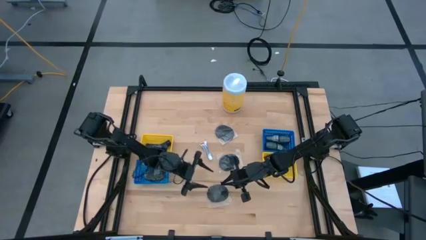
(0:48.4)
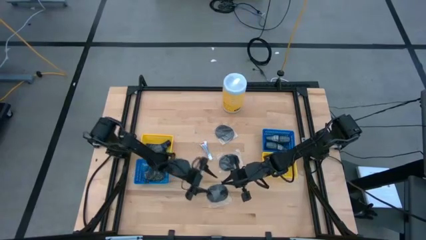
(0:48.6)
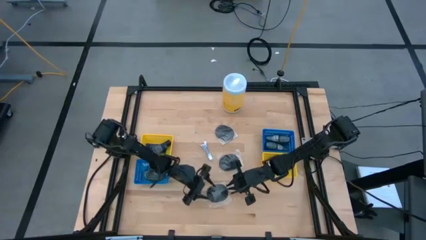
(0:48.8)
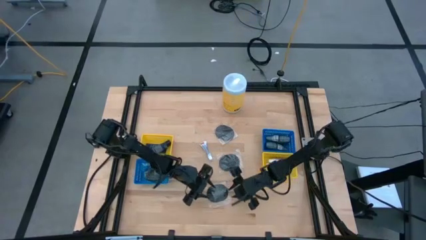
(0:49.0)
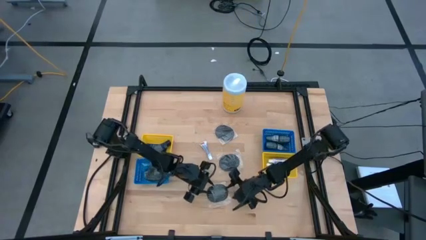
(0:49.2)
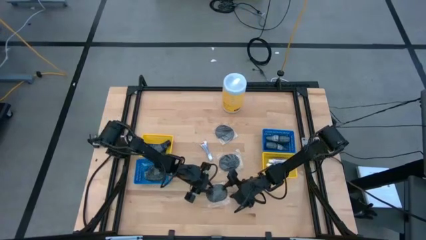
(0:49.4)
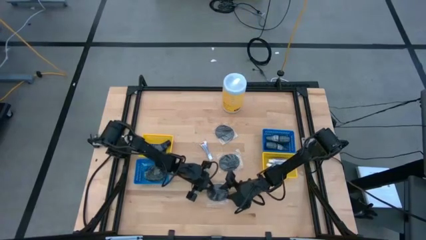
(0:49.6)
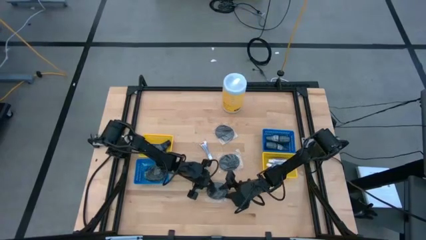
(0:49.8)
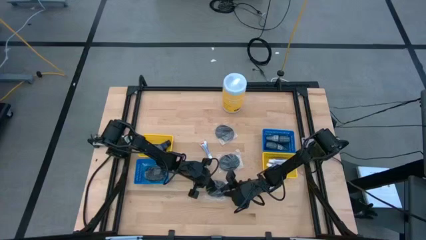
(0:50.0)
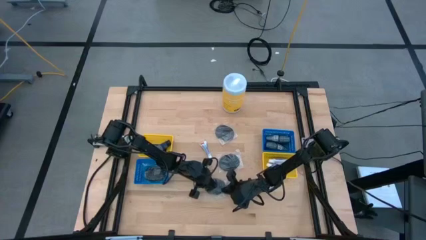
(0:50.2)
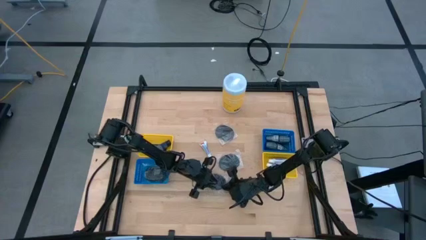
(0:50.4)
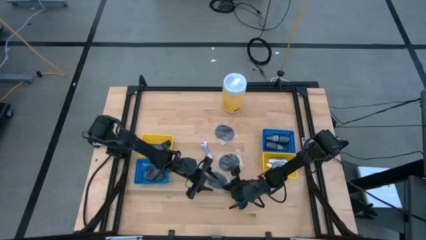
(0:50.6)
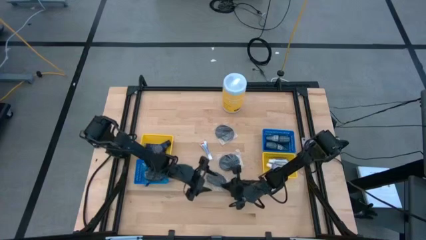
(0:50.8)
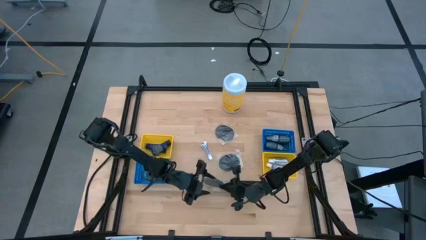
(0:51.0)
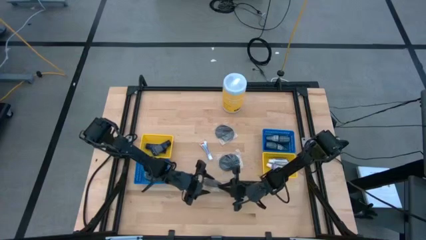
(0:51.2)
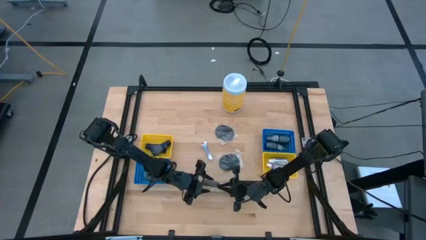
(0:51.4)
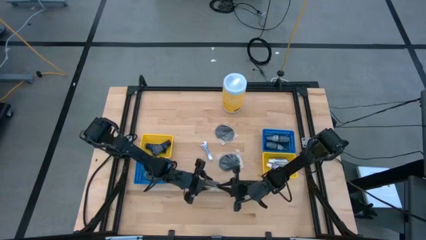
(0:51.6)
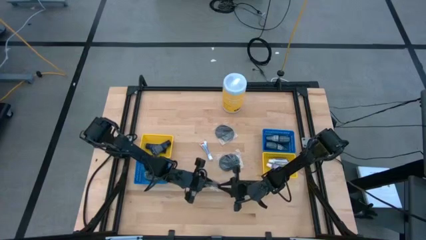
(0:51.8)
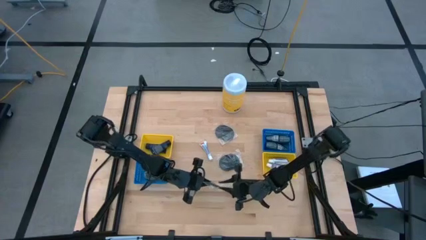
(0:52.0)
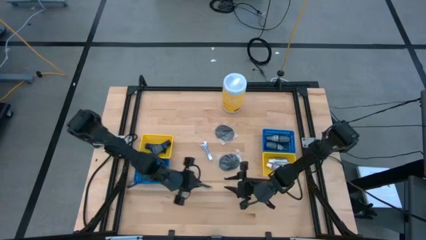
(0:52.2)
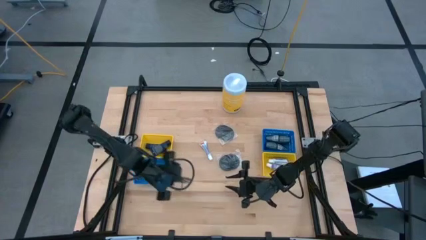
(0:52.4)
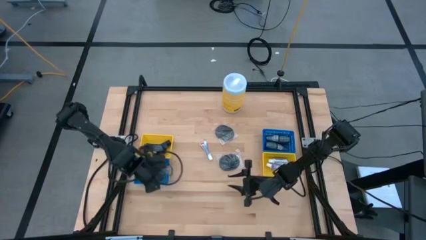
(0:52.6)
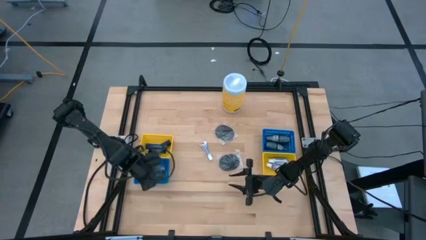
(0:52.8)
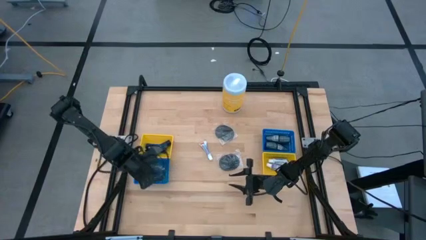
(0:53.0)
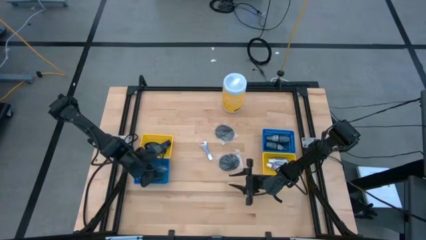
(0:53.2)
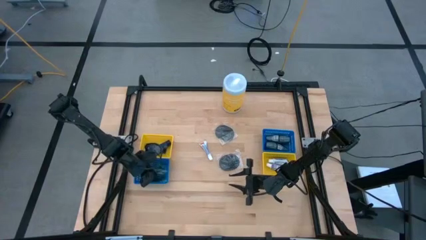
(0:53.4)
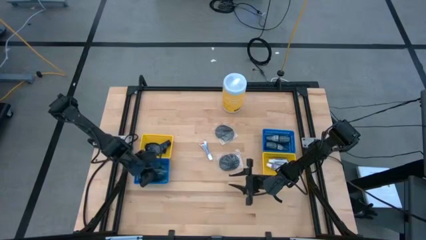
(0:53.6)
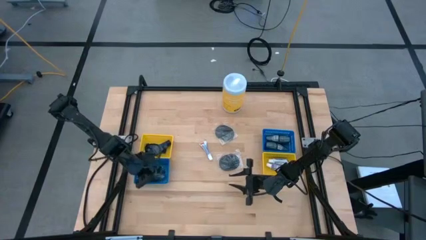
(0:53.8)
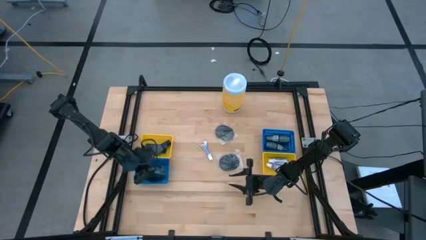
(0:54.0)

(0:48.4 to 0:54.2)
Task: Pick & Place Travel size toiletries
Put the black hairbrush into the left blue bin

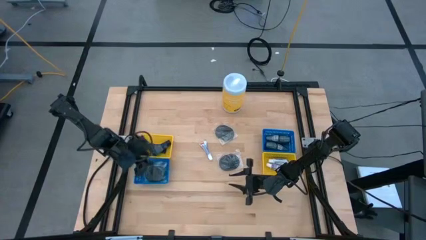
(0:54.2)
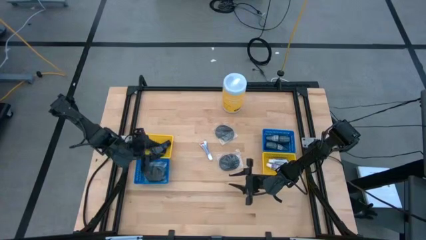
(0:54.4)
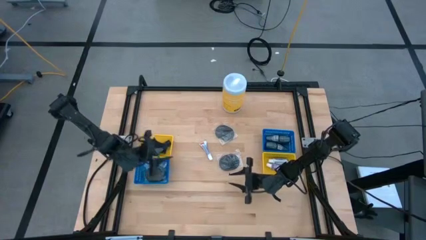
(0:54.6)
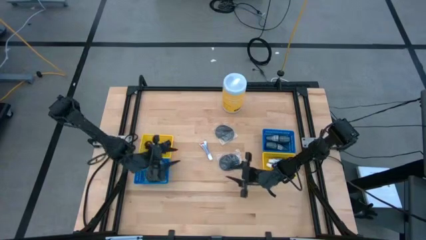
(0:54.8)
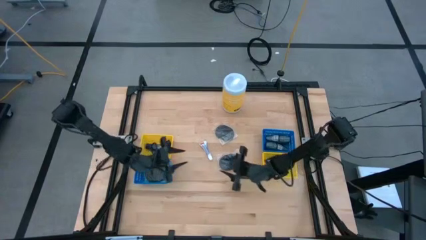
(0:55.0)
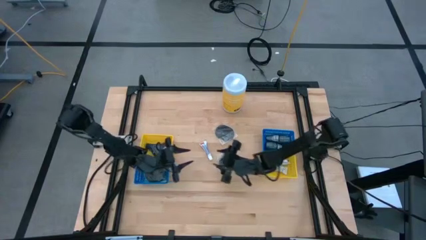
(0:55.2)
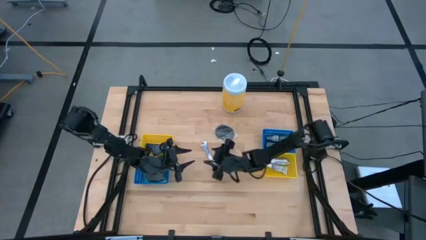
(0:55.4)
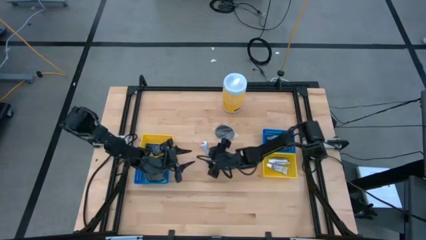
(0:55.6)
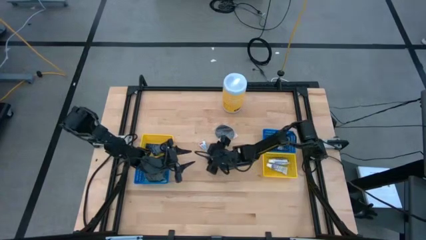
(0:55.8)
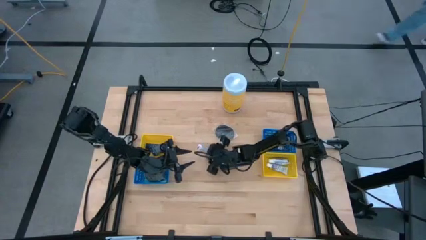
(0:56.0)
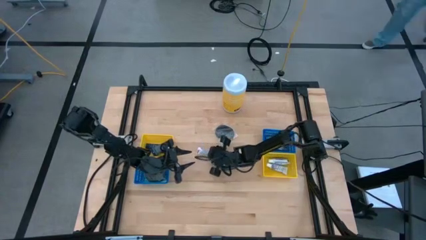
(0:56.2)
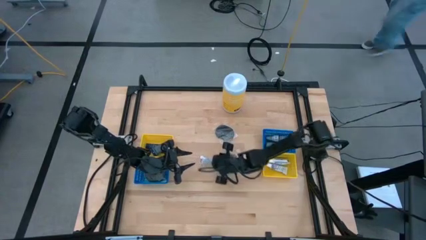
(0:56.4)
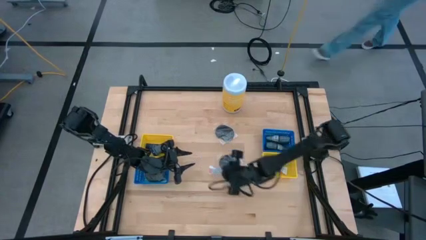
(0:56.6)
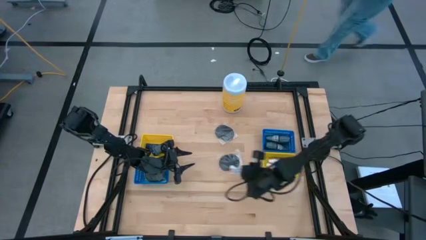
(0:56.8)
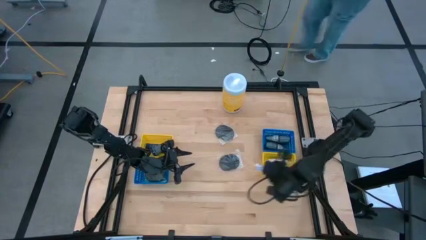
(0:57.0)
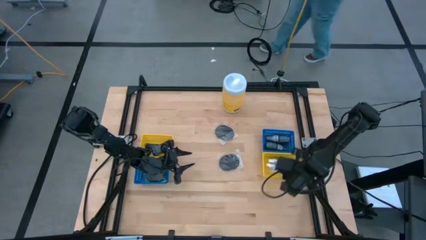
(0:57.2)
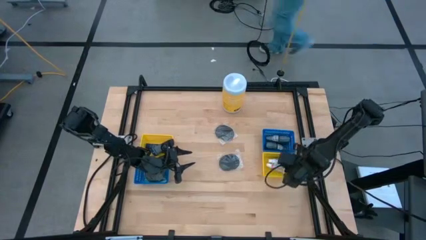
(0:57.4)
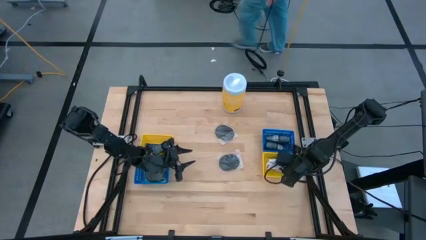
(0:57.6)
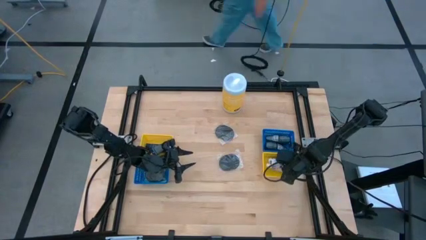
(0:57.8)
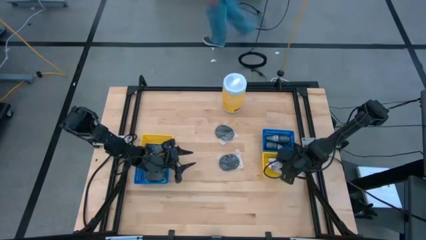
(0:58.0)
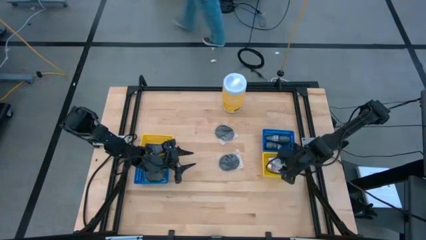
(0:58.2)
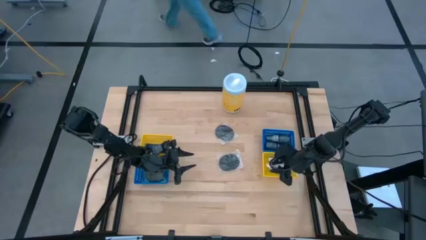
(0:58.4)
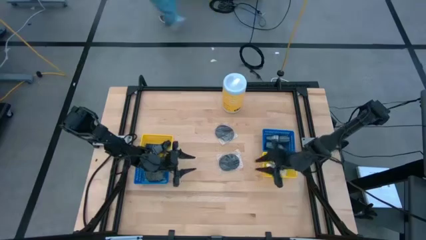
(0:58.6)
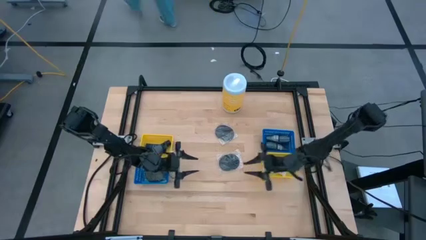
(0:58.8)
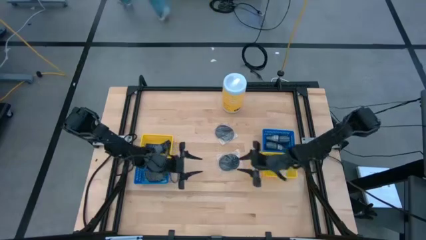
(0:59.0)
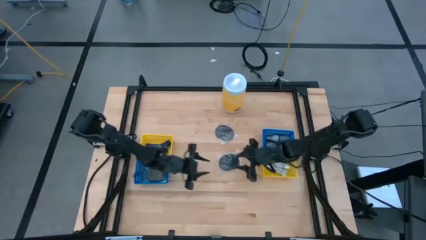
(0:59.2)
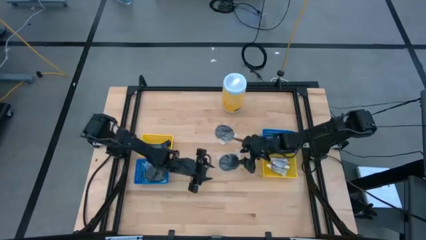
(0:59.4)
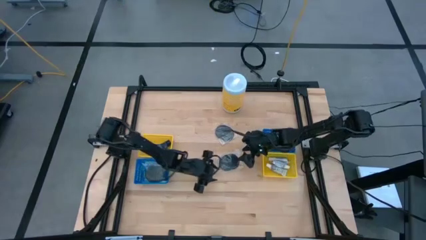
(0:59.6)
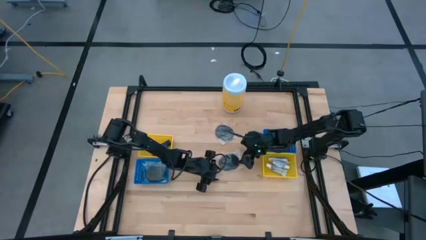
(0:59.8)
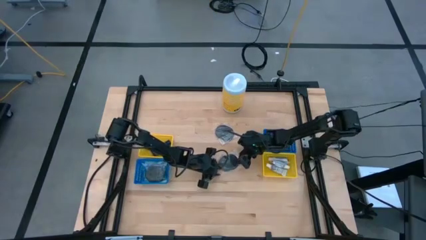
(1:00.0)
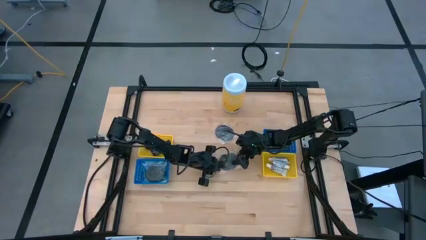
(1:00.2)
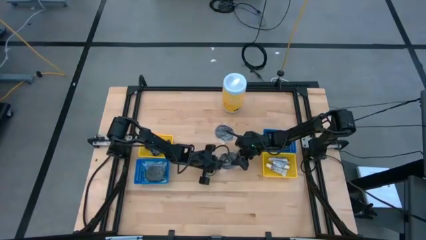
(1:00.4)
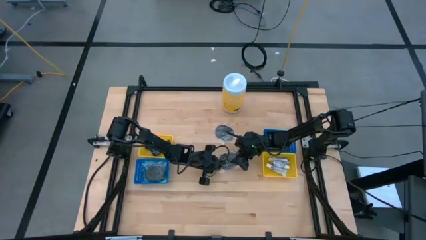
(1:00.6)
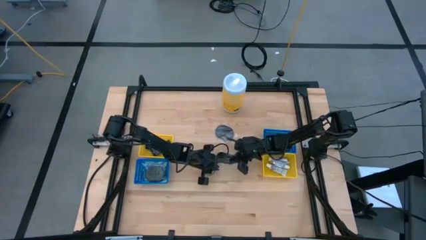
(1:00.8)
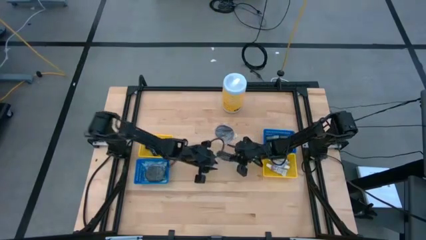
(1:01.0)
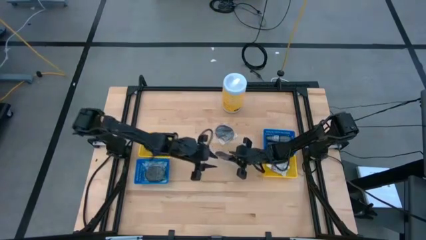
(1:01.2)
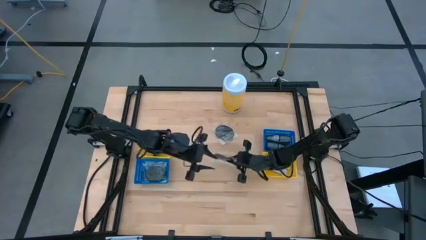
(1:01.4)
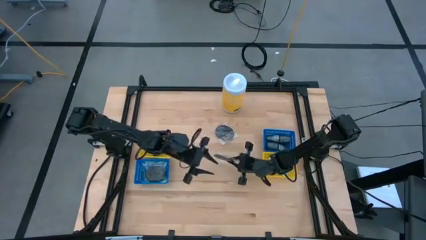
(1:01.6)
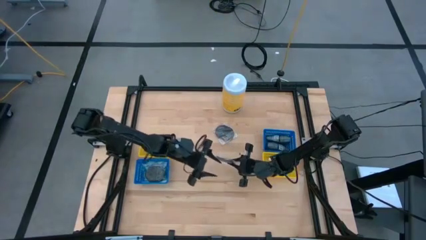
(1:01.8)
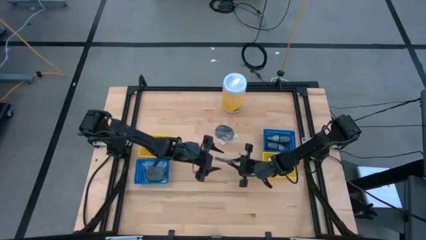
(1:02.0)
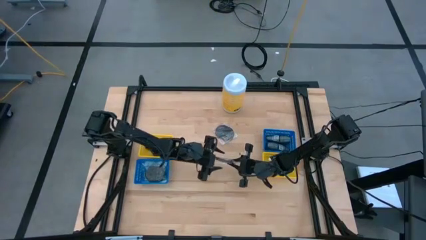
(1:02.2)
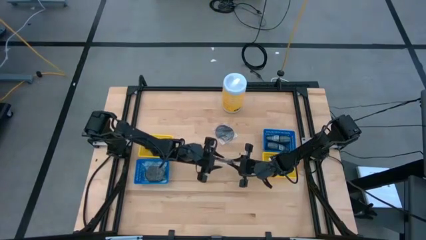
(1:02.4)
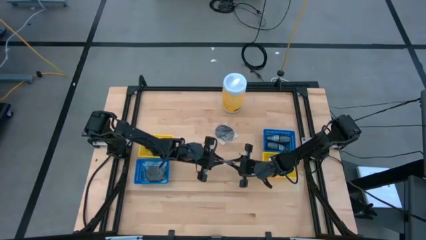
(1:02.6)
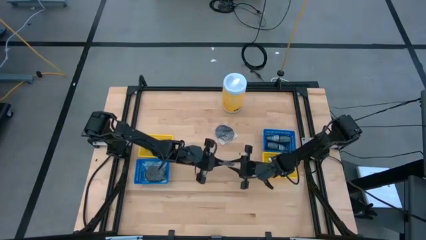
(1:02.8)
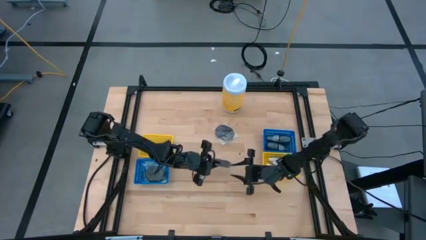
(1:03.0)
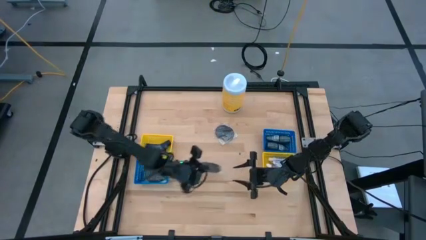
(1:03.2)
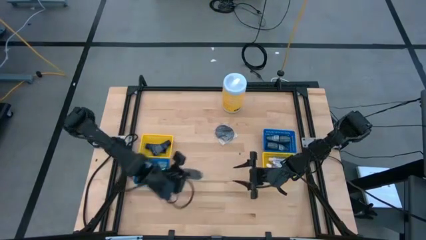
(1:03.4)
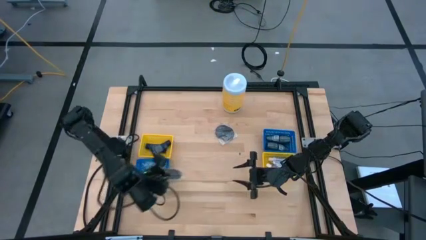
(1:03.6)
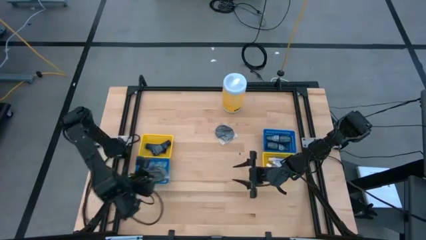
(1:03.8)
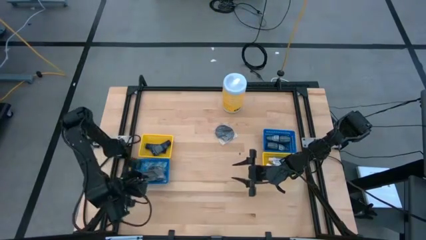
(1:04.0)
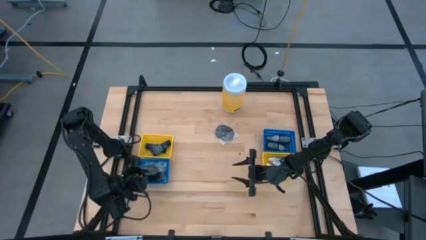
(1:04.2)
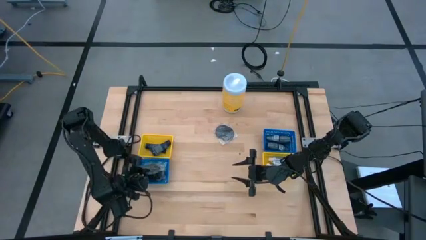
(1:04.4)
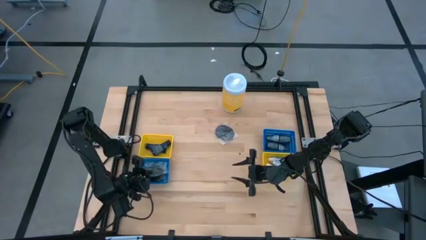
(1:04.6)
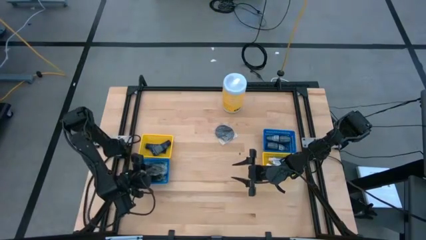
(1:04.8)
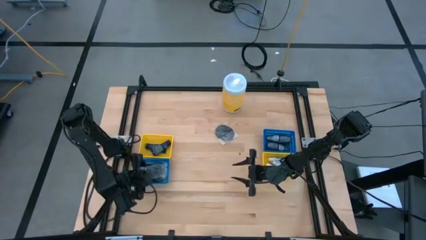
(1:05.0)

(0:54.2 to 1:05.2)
Put the black hairbrush into the left blue bin
